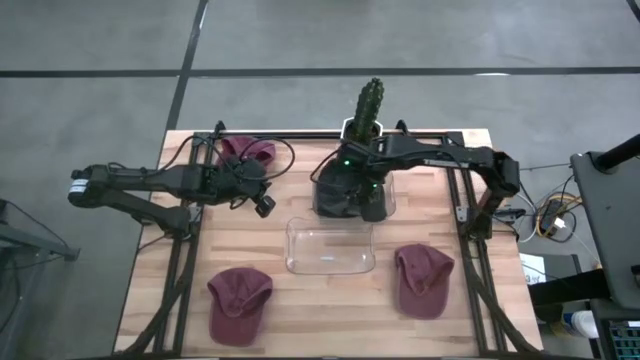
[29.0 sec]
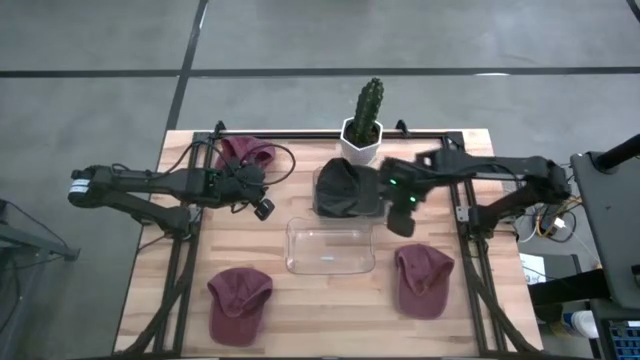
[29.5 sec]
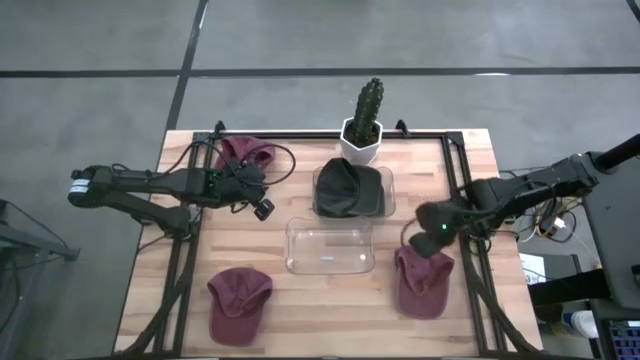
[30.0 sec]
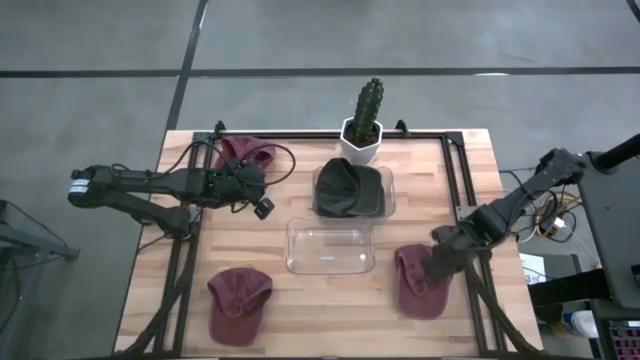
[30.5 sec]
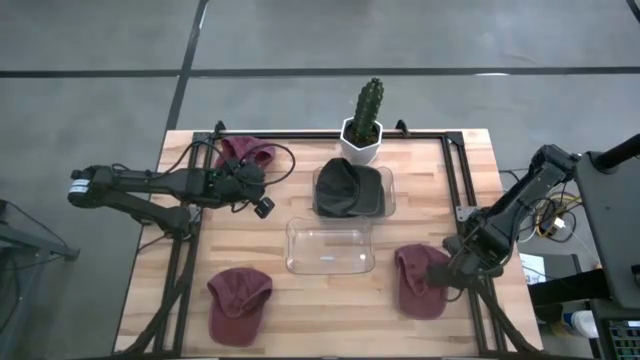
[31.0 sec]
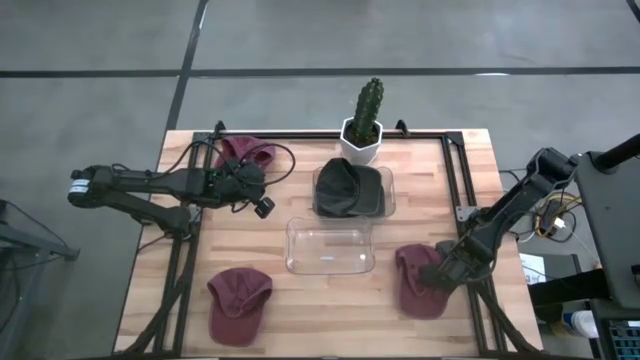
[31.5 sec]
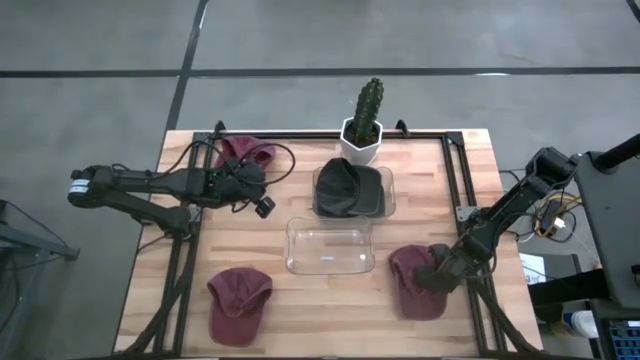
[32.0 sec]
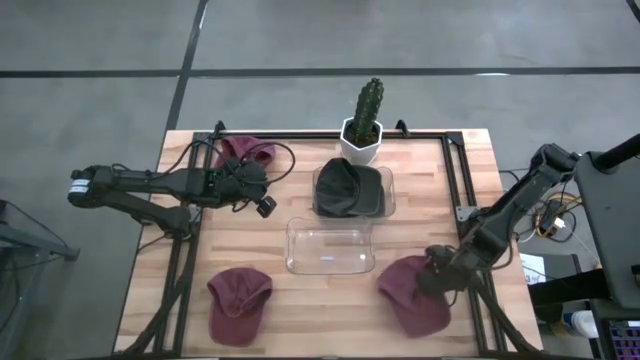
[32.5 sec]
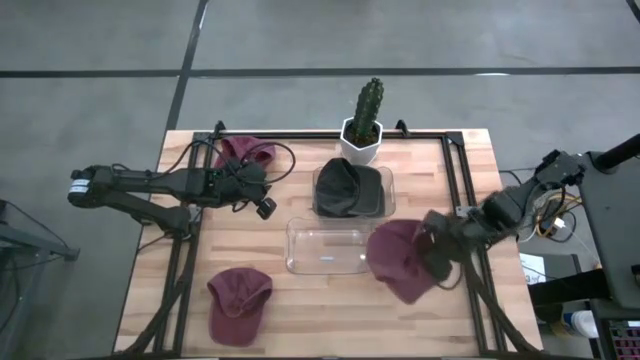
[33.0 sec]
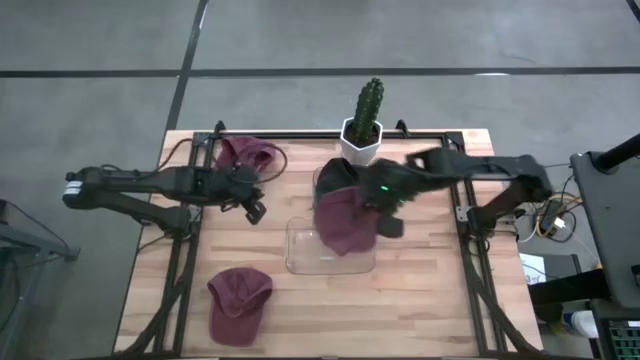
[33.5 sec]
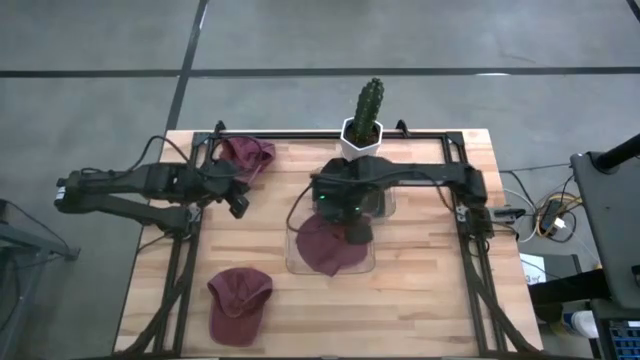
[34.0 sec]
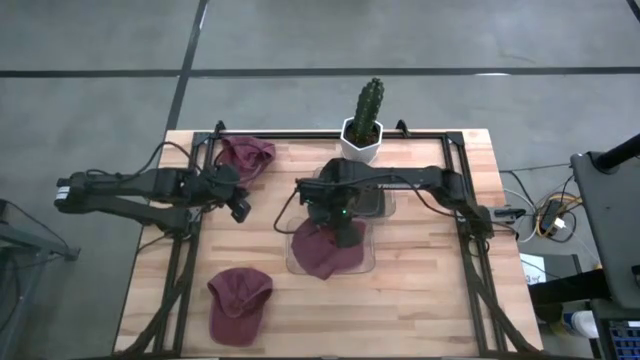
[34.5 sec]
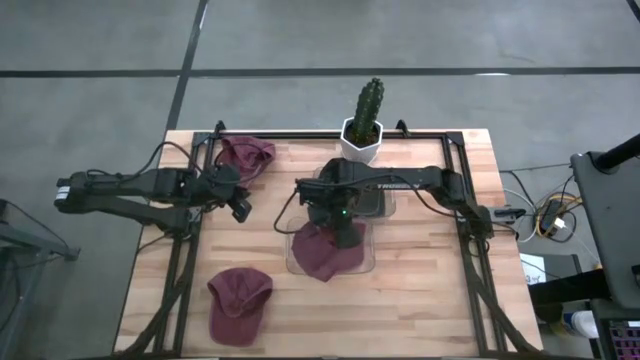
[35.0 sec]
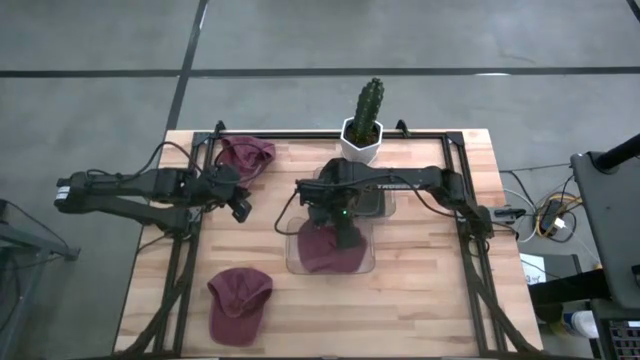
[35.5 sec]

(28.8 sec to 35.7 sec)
Task: Pick & Place hat
Put the right red cap into the bottom transparent bin

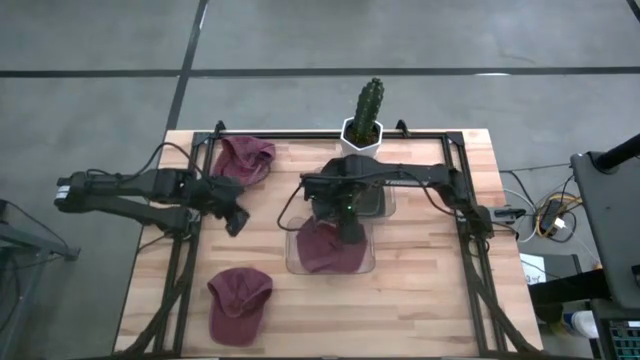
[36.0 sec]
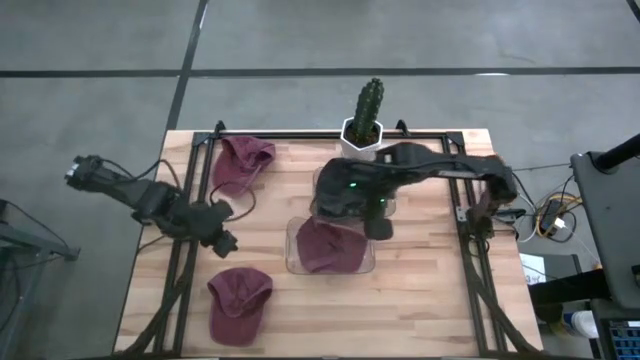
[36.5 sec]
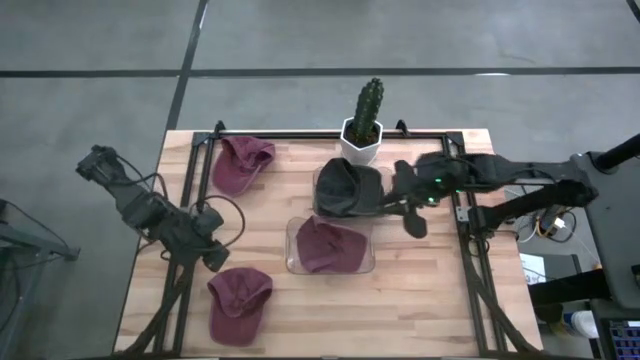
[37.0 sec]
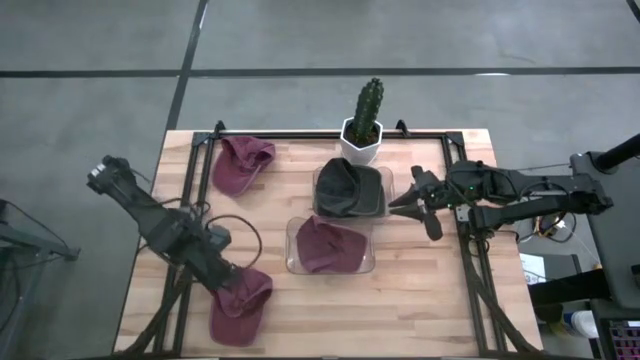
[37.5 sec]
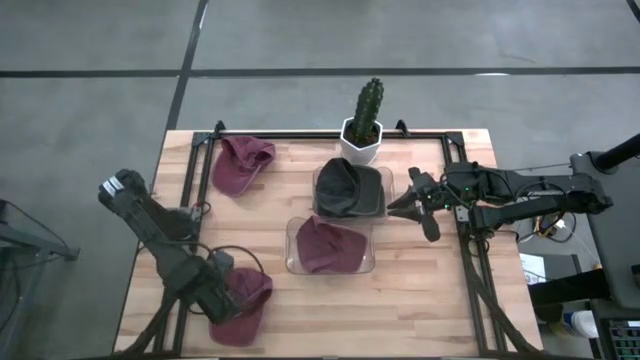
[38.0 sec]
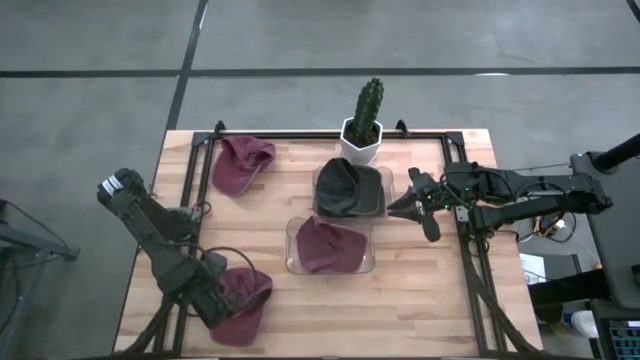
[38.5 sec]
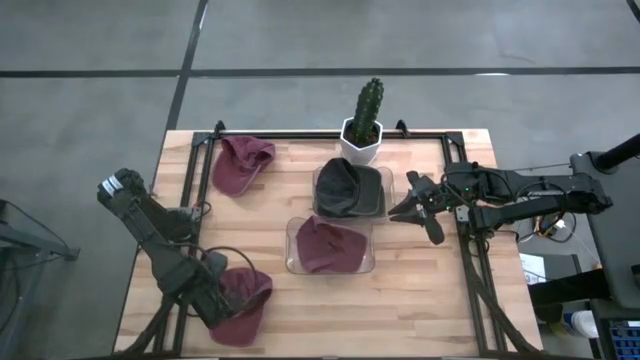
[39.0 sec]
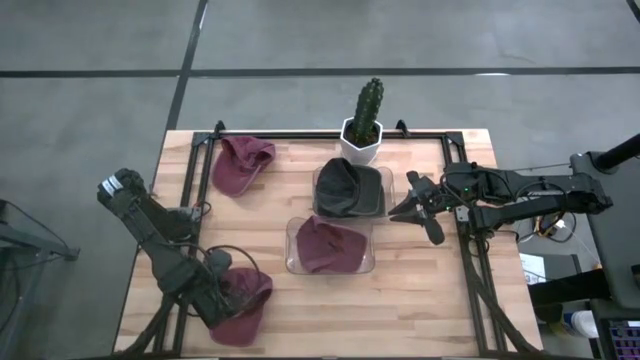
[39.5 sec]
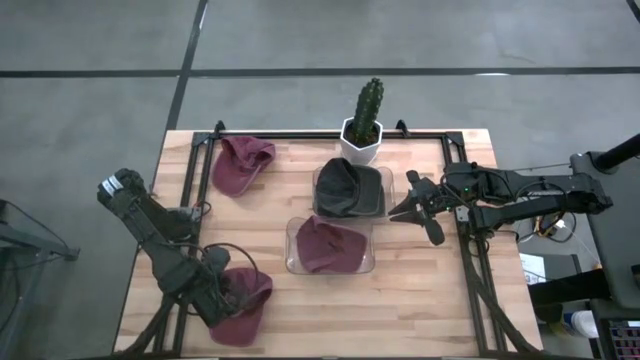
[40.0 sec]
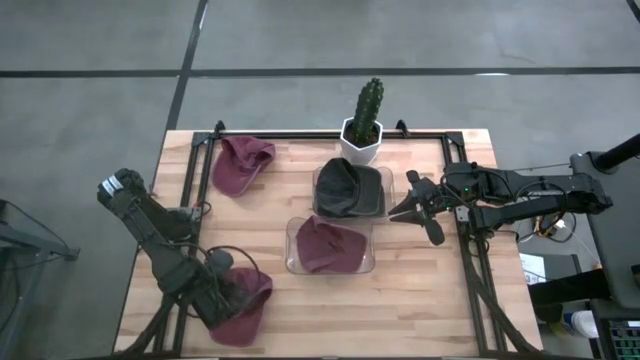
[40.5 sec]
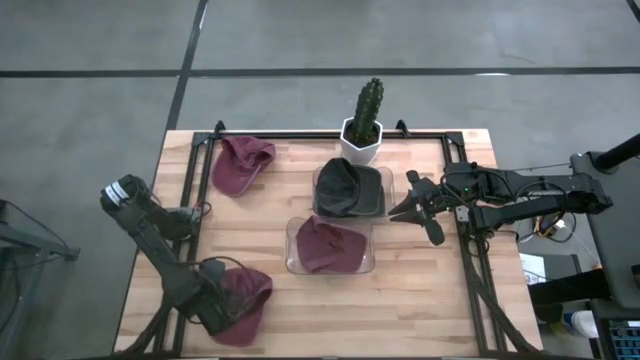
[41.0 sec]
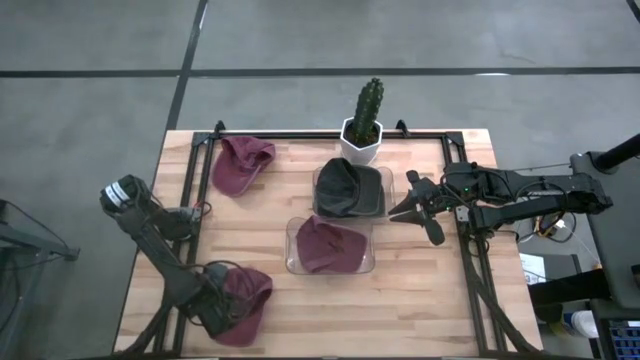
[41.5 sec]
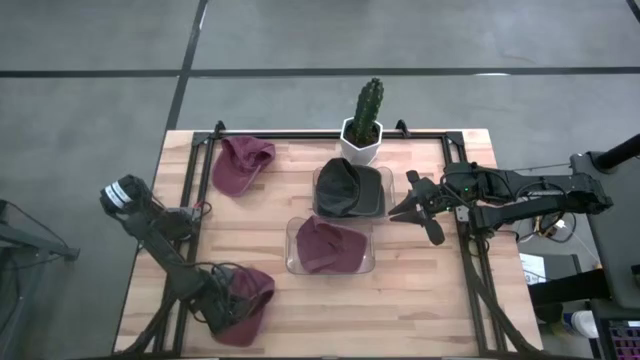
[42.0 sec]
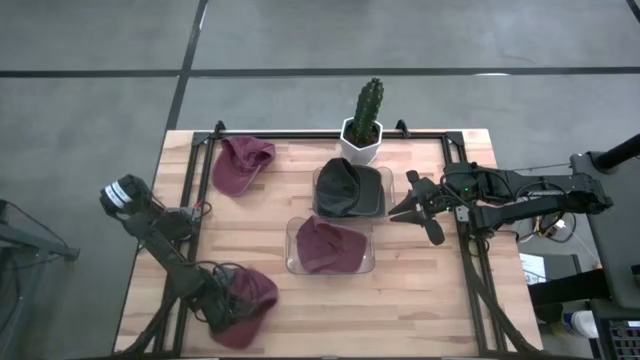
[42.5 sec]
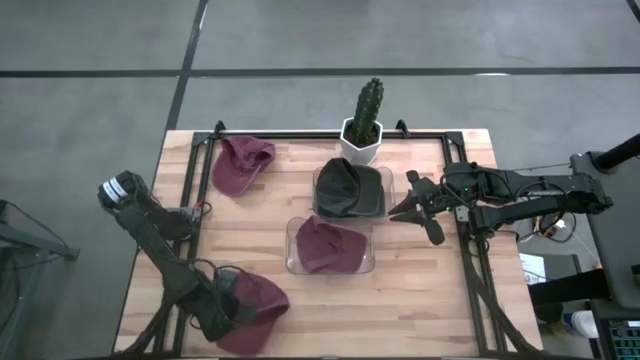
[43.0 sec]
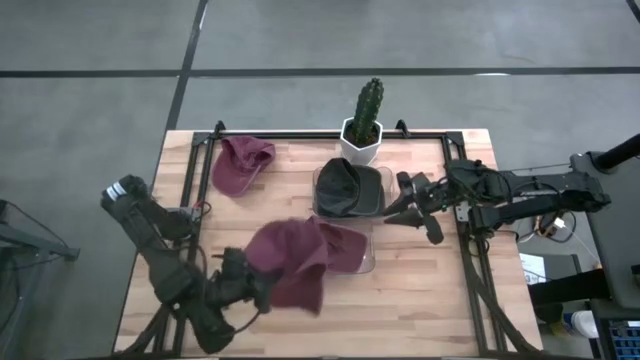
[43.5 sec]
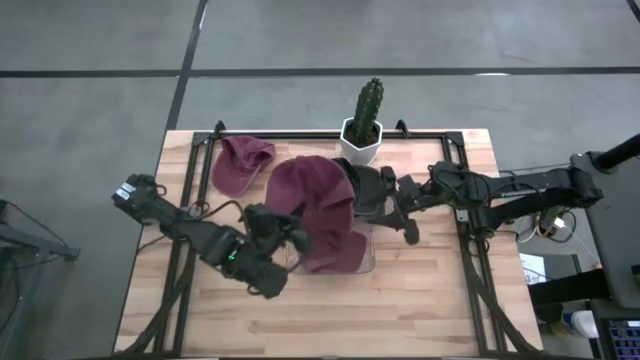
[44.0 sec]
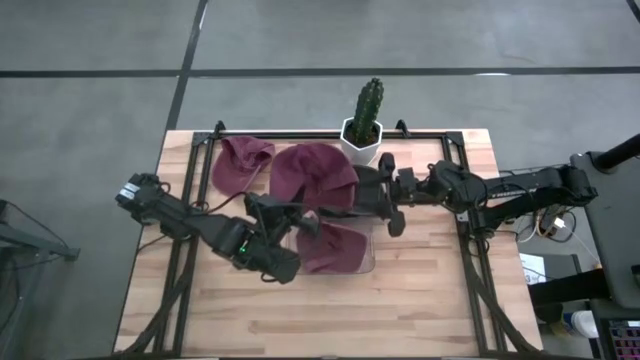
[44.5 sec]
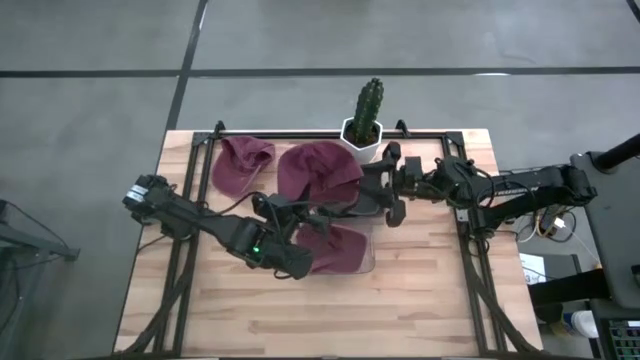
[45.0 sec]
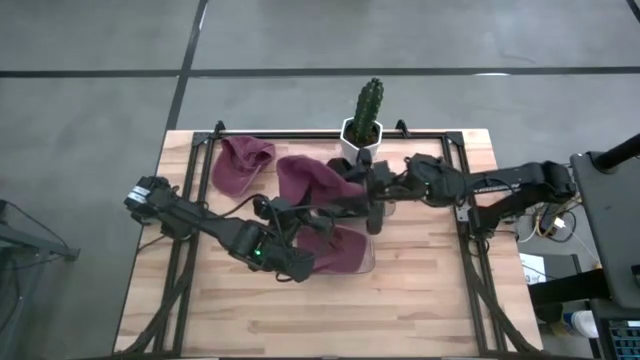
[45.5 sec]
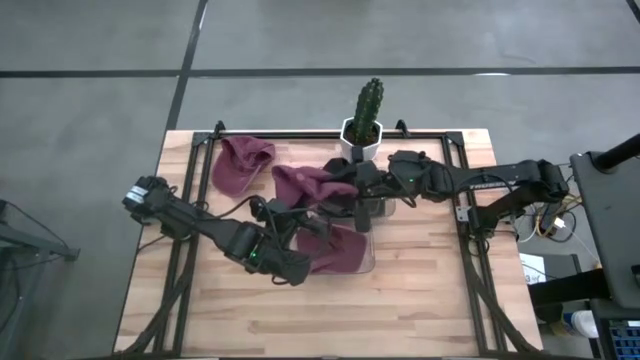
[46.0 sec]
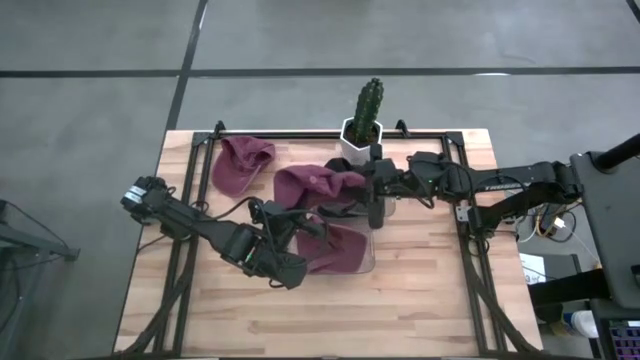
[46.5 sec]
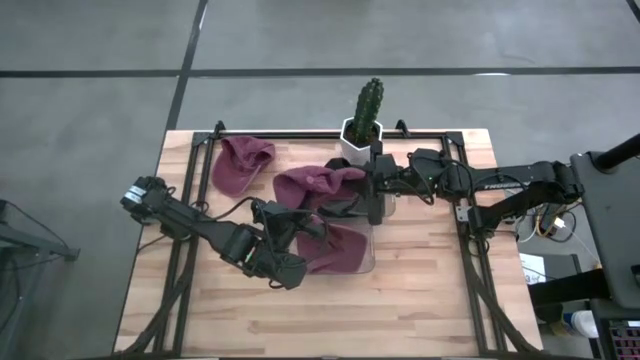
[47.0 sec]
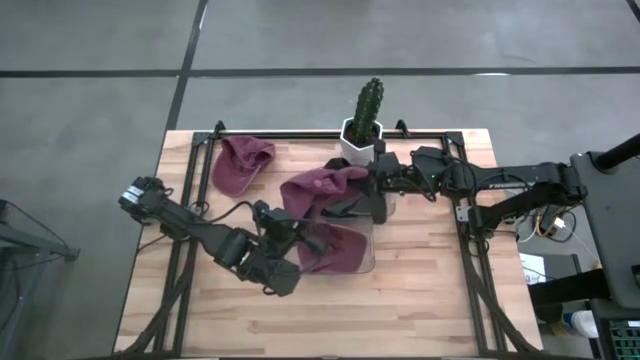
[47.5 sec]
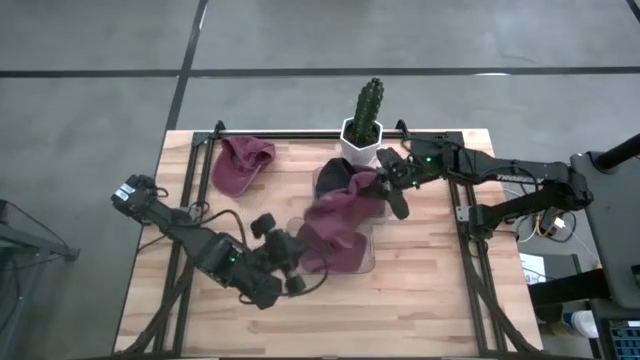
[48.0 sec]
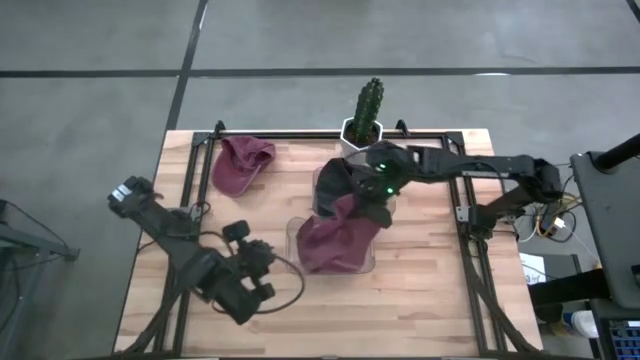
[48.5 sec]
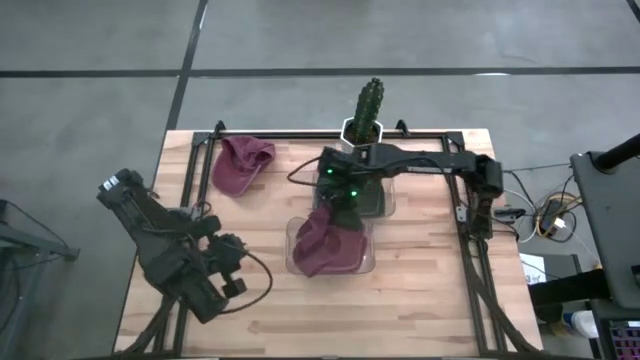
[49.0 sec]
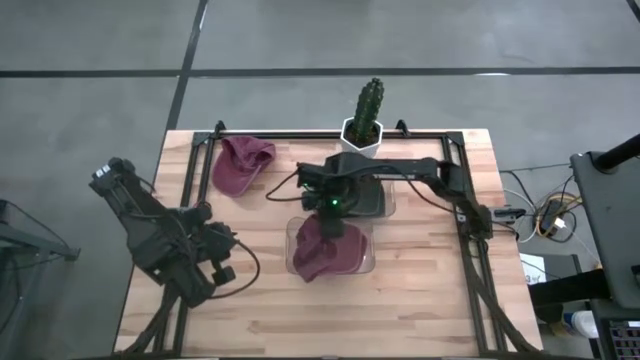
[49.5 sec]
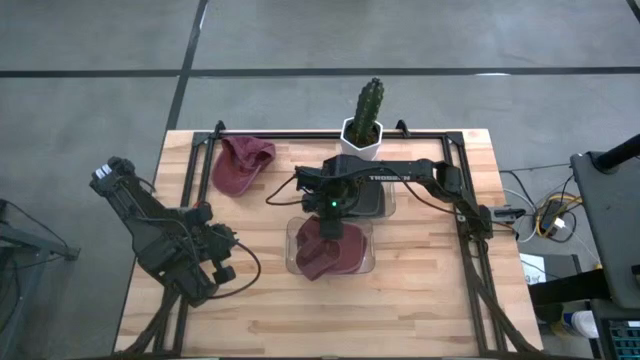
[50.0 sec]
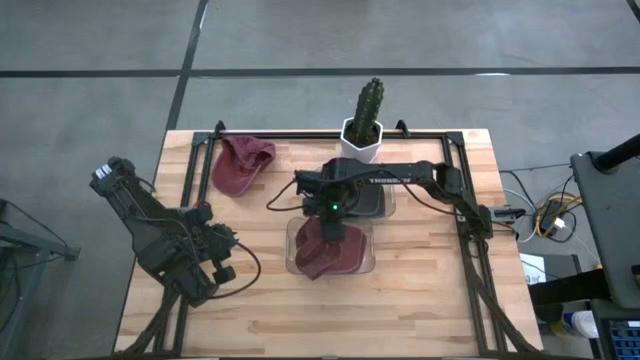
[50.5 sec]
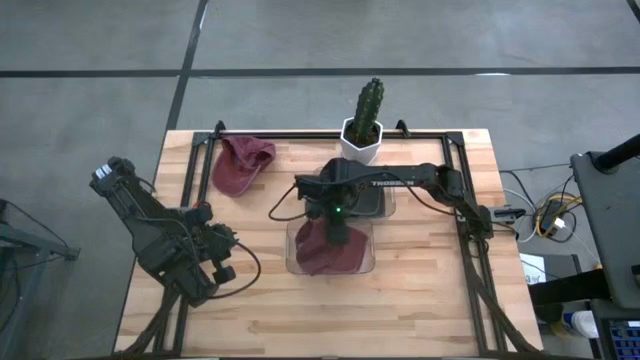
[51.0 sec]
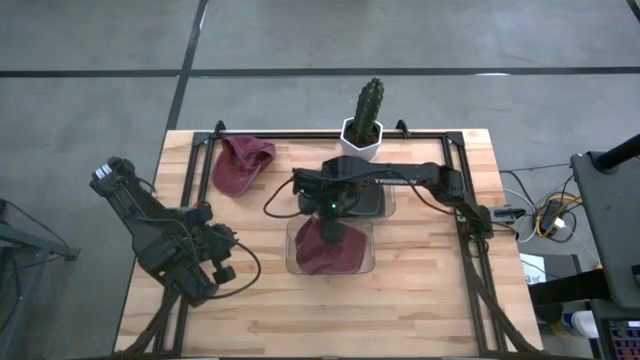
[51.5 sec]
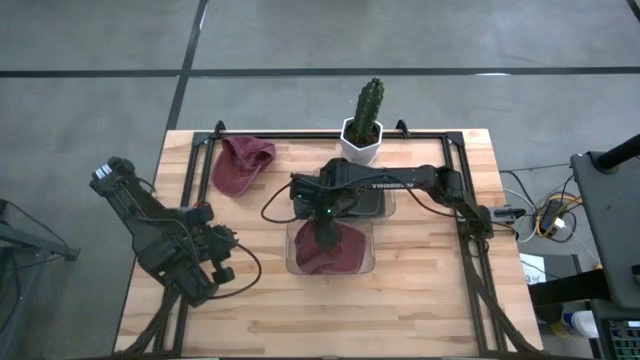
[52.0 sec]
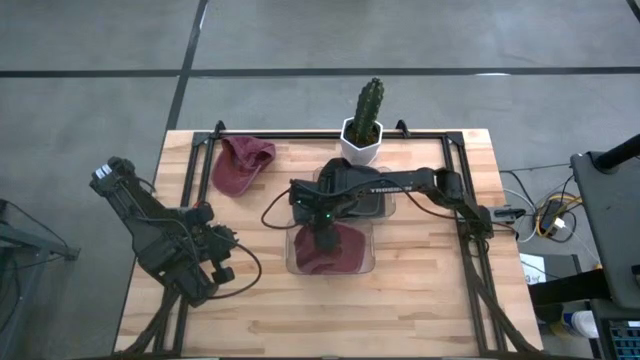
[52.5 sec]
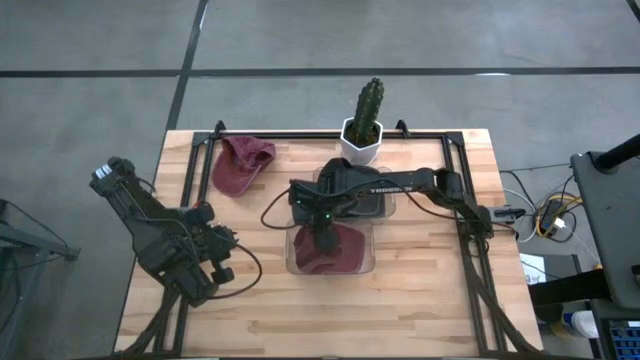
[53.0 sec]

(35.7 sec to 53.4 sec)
Put the bottom red cap into the bottom transparent bin
